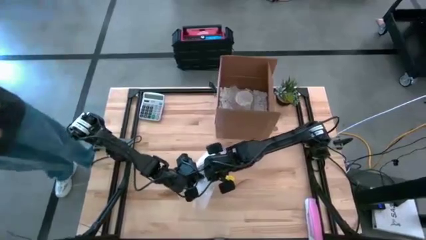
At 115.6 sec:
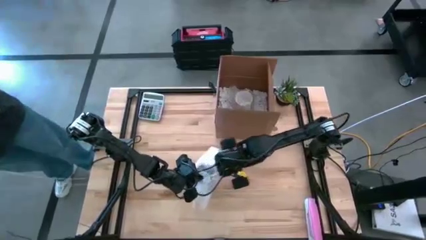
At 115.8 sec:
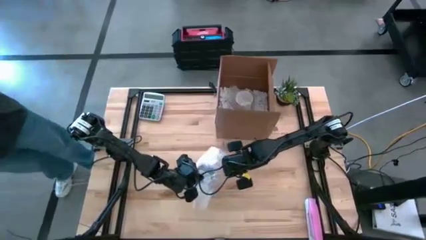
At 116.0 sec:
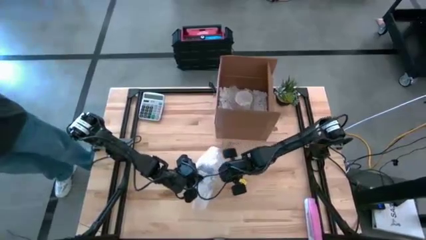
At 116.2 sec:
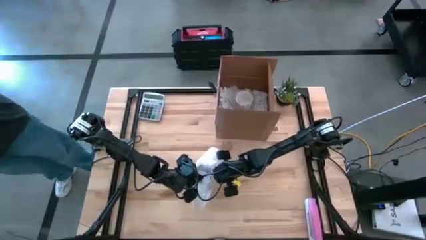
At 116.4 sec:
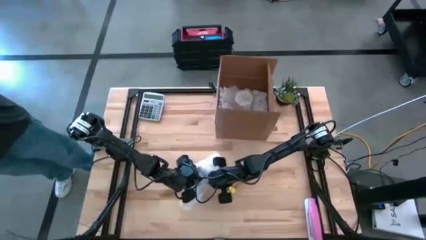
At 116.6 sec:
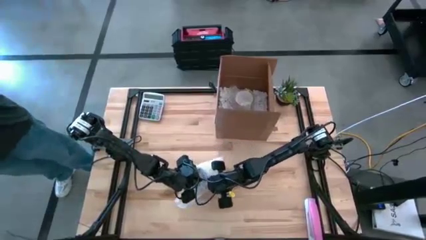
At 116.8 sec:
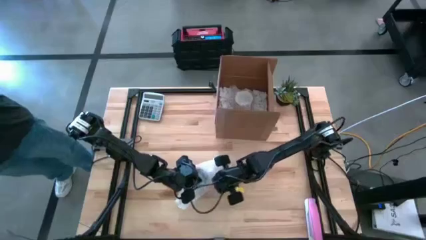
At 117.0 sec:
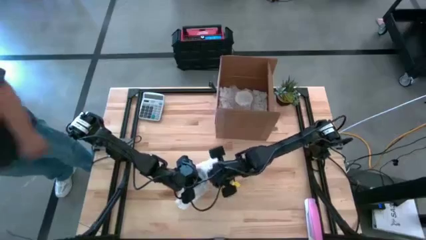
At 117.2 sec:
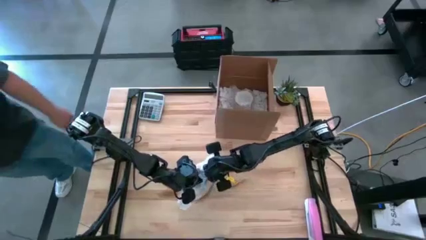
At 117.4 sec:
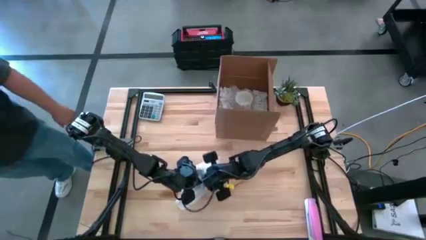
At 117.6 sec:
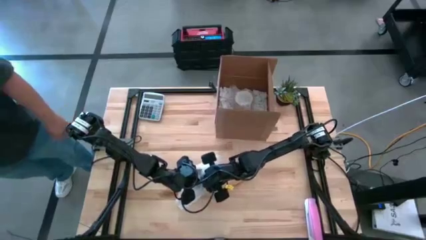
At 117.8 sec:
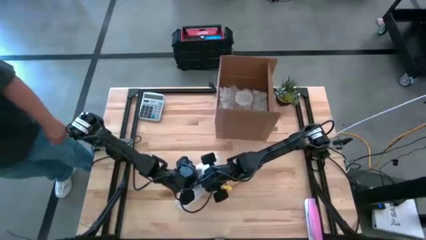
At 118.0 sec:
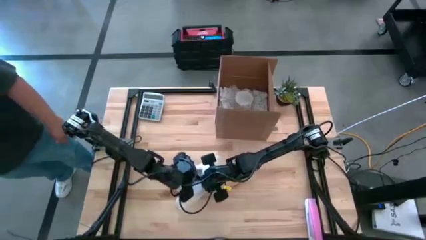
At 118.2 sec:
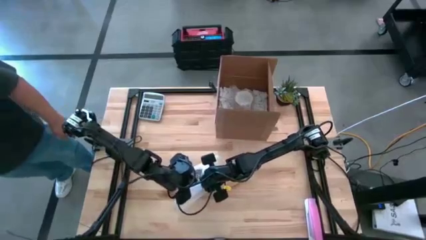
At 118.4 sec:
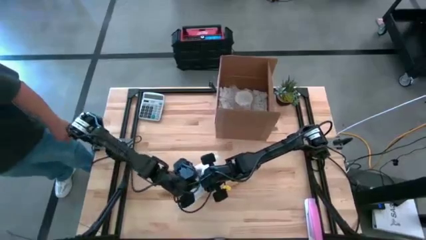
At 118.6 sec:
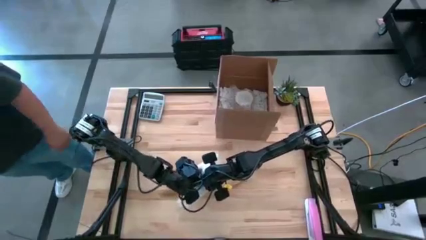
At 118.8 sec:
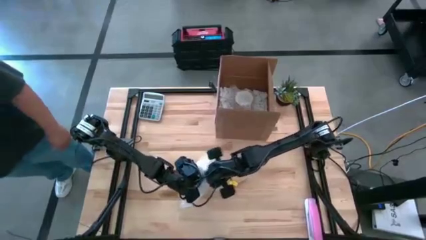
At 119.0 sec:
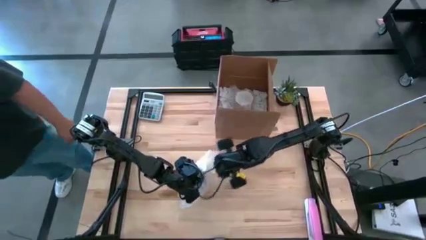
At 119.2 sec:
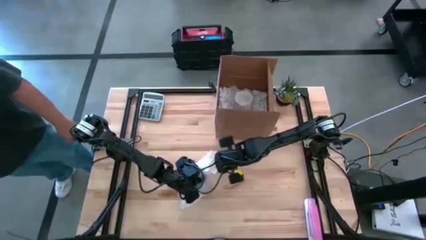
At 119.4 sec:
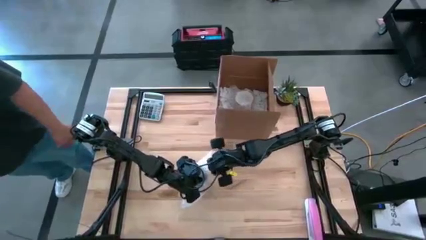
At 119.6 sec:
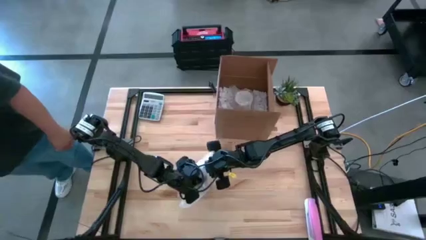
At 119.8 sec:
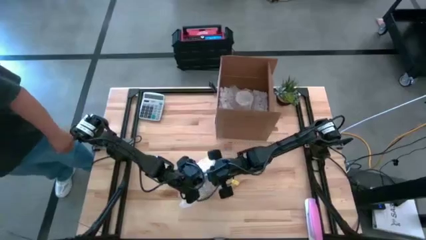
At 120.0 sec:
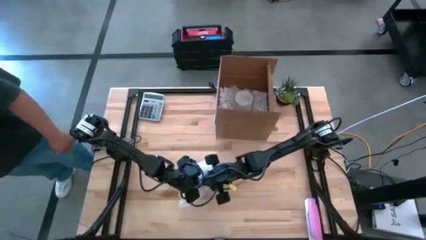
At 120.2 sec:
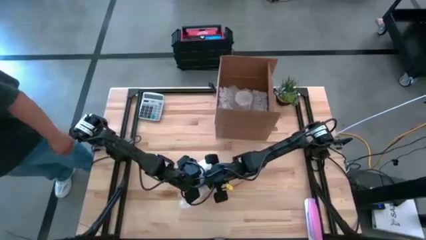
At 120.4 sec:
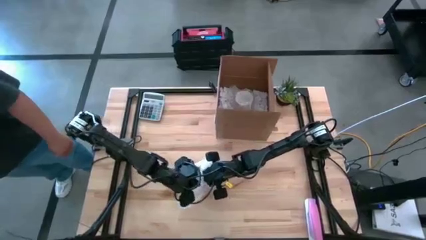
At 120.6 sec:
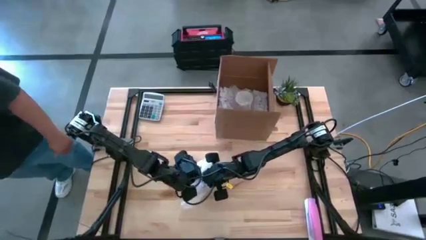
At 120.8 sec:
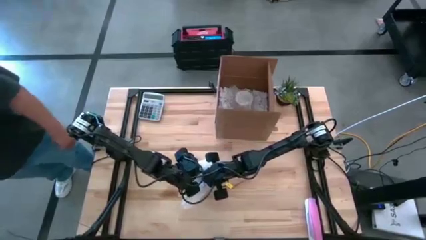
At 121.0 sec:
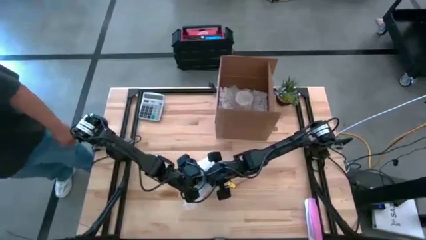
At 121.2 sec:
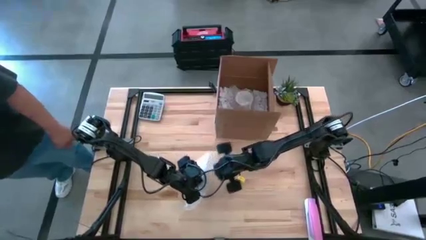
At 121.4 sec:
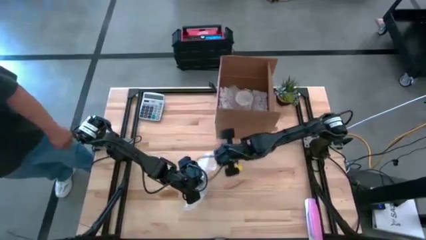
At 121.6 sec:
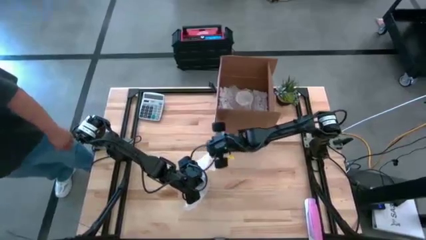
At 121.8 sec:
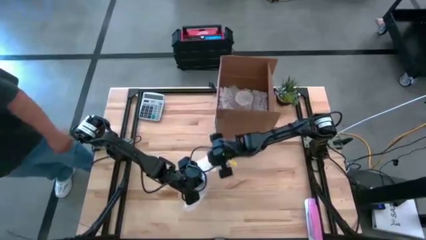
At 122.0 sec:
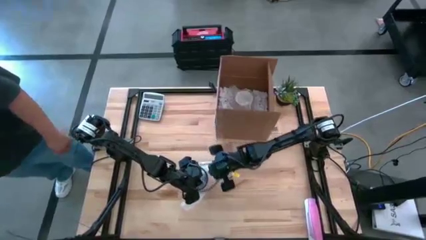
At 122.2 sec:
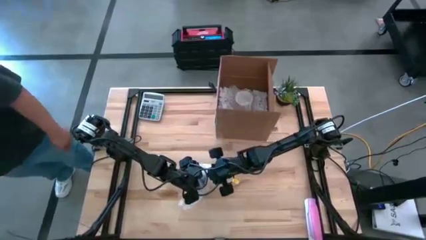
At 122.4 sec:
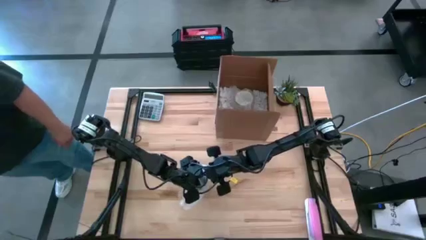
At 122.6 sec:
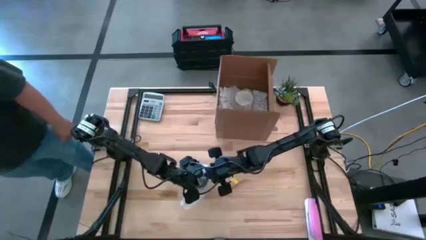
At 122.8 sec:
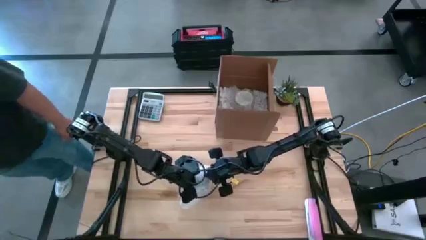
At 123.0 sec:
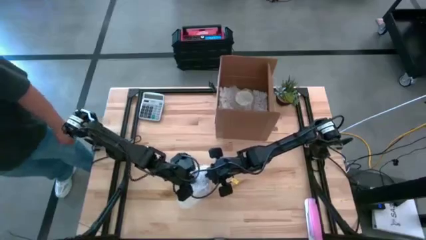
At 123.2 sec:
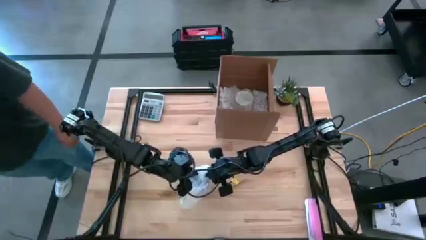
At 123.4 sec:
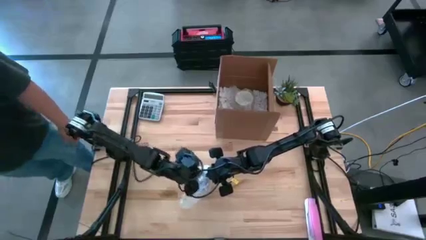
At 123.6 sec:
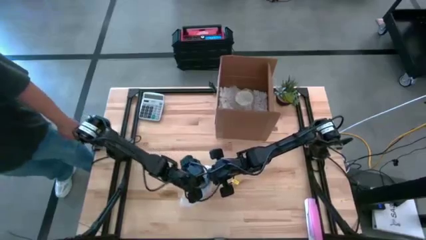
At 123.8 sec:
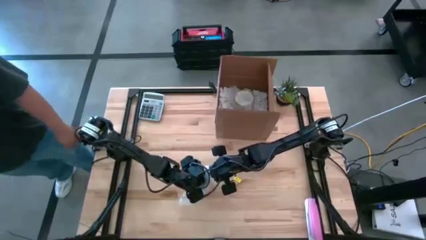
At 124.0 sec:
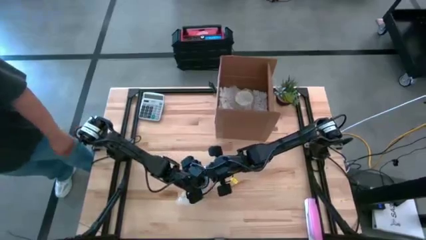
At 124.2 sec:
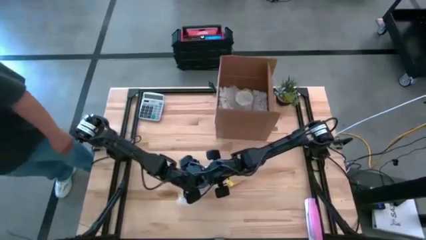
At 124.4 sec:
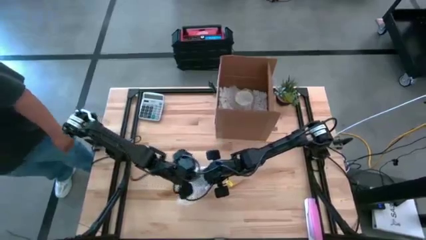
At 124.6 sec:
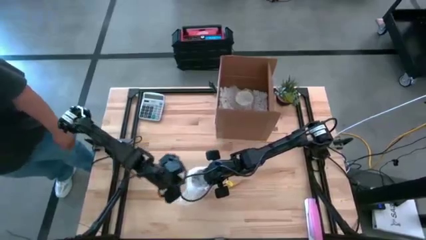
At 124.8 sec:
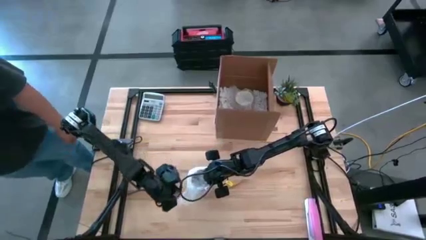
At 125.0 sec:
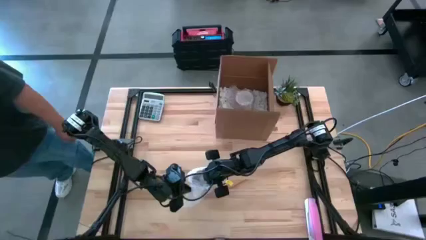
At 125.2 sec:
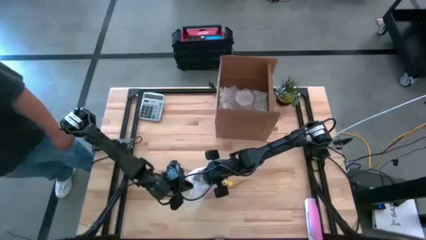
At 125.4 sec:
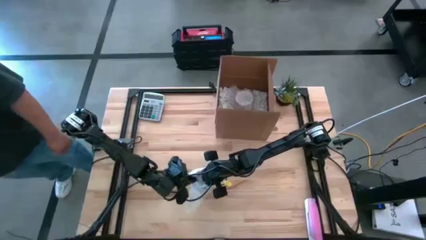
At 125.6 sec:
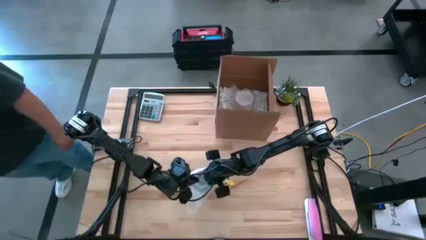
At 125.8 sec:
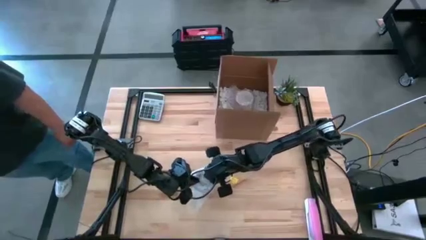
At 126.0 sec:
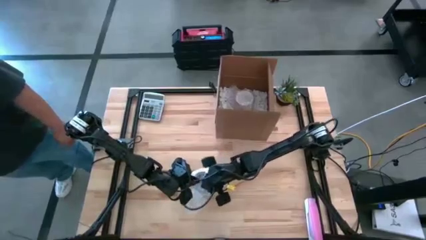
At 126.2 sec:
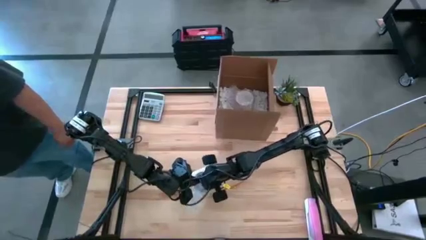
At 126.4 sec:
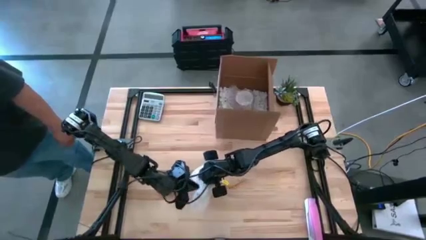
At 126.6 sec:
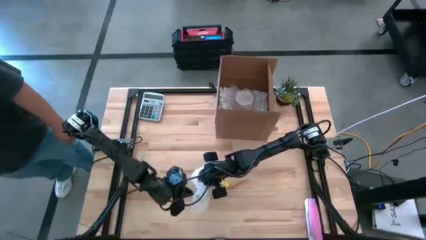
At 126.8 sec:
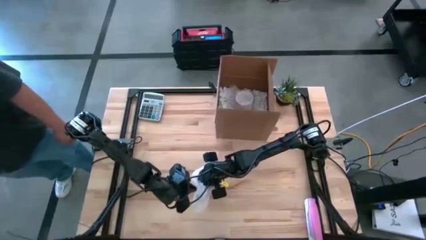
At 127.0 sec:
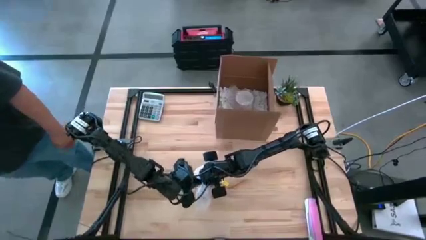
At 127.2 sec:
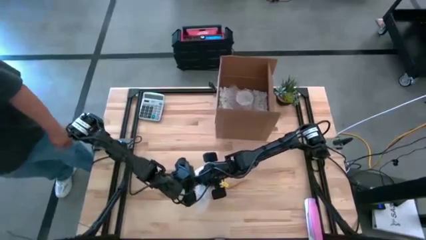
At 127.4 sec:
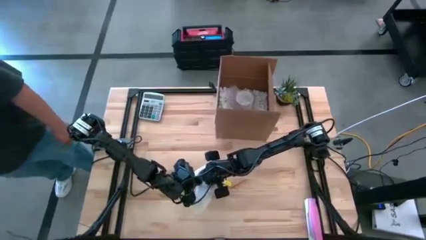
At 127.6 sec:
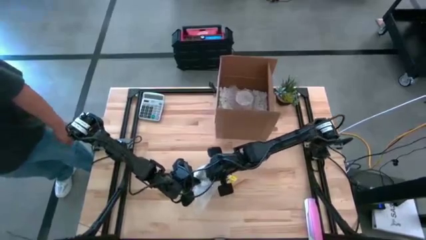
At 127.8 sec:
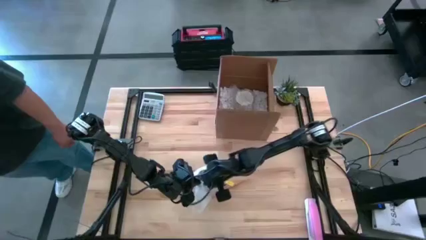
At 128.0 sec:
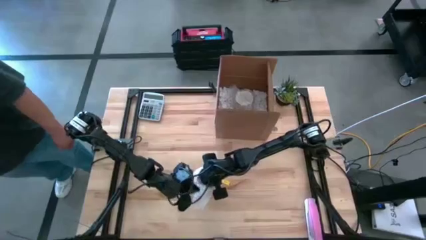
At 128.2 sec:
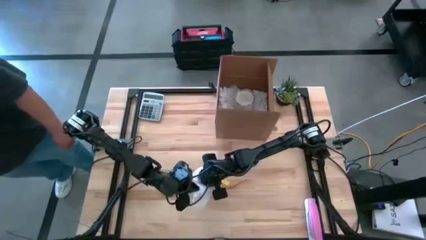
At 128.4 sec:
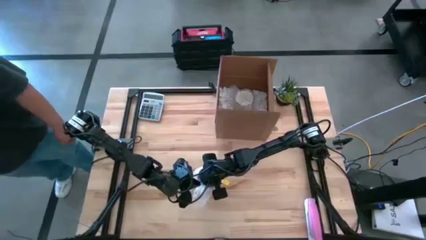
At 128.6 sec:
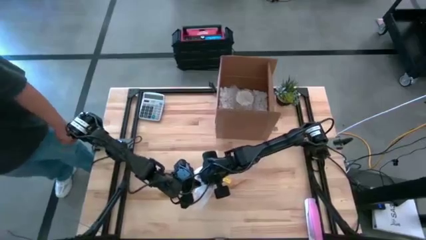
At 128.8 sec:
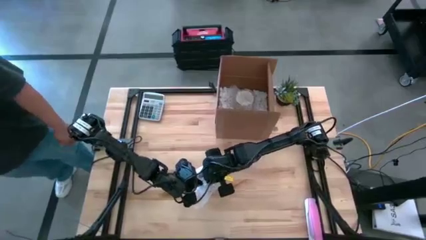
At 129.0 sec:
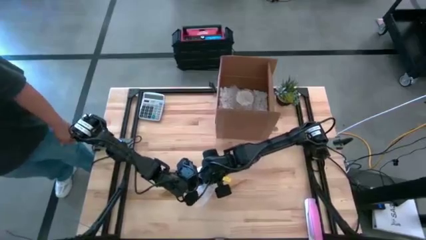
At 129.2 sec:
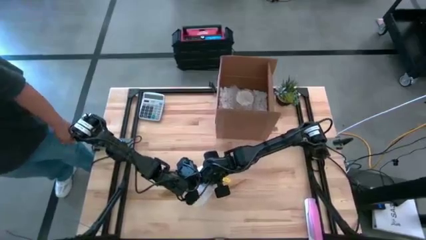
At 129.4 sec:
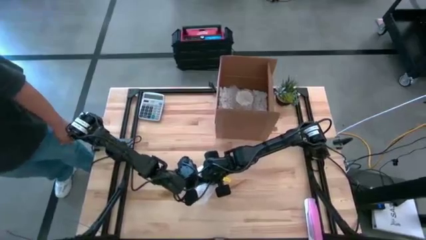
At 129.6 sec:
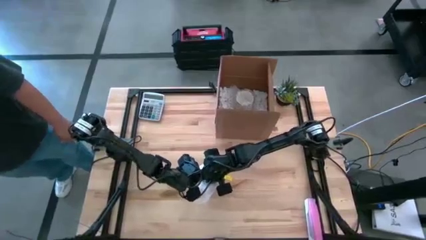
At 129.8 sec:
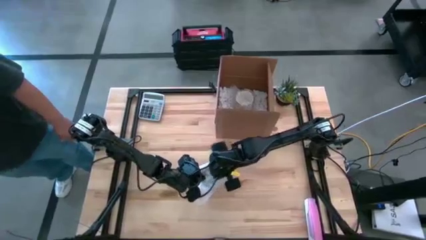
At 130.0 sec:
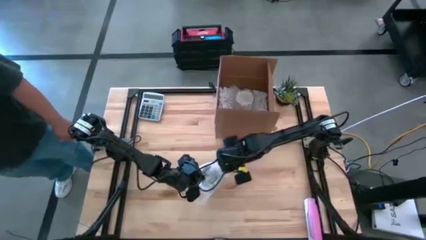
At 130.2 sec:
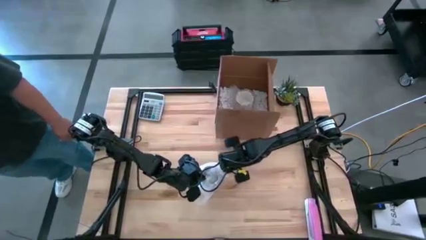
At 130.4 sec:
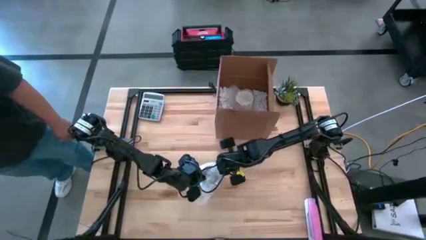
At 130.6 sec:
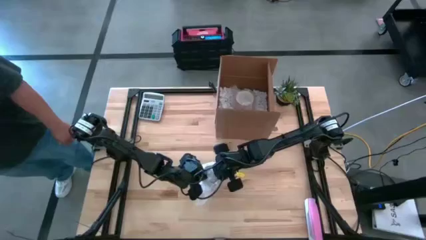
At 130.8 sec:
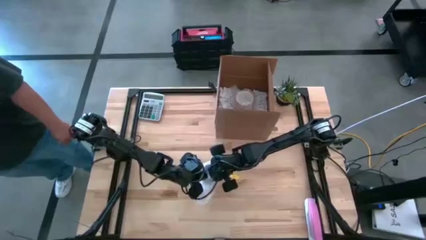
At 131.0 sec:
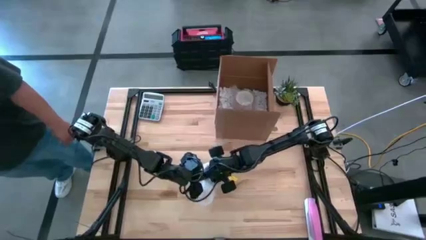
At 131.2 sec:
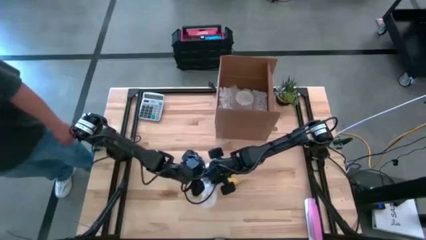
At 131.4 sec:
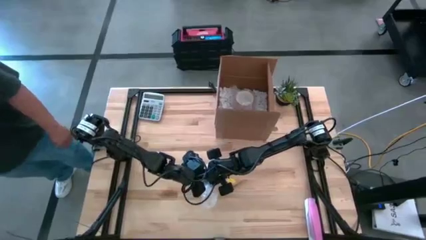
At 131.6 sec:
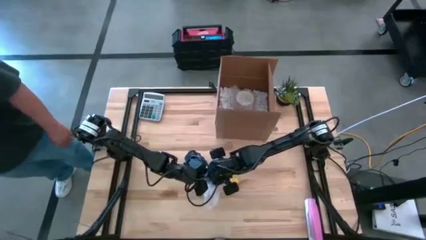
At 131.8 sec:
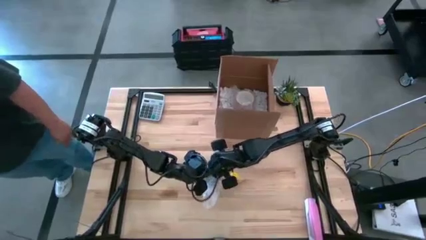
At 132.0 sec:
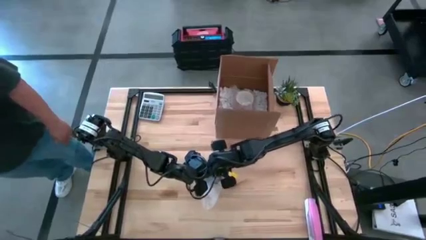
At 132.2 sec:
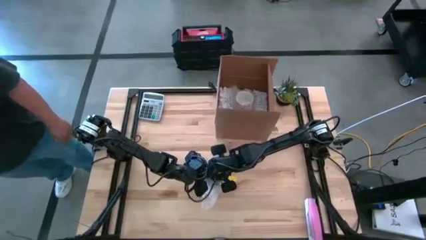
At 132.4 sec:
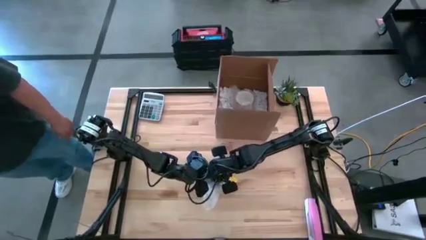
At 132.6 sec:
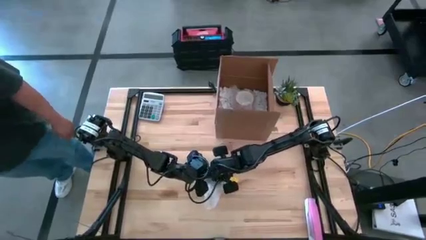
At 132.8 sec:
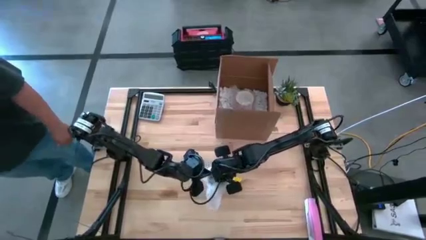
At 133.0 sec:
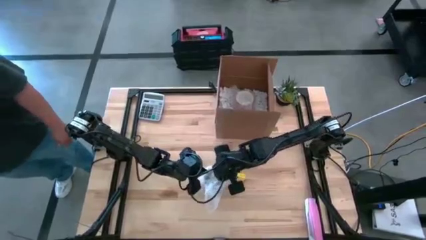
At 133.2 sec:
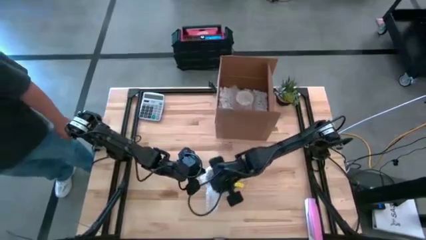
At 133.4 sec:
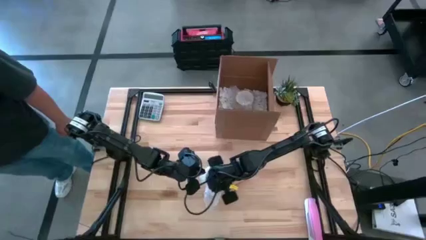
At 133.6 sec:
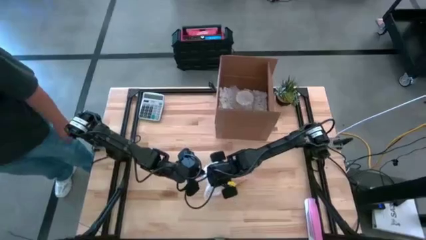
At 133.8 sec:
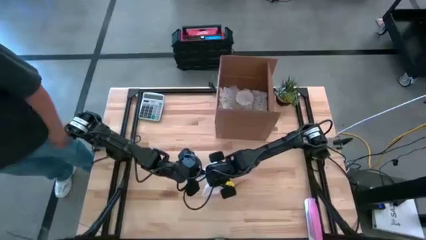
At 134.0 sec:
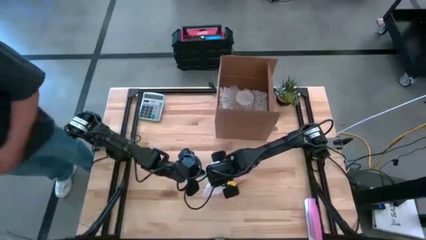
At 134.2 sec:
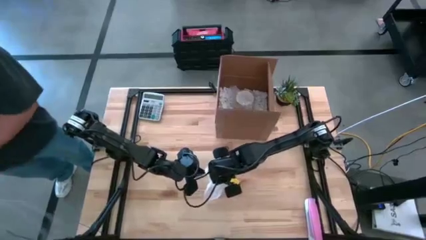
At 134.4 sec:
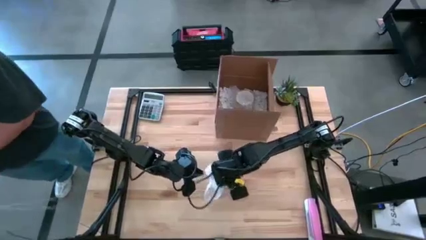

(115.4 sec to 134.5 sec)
Task: wrap mug
Wrap the purple mug with the transparent bubble wrap
